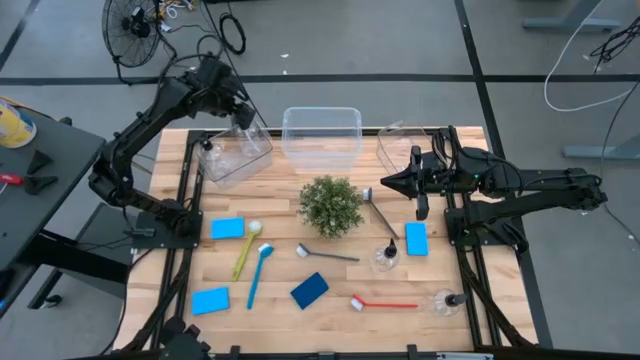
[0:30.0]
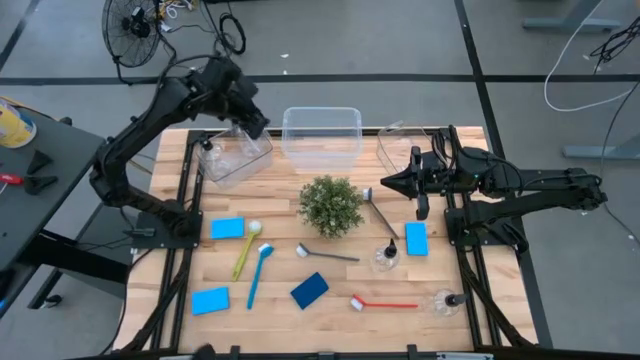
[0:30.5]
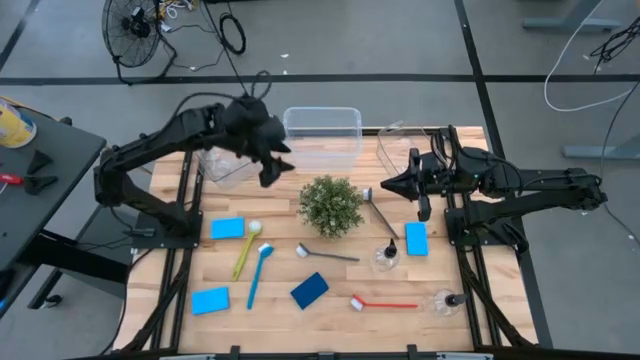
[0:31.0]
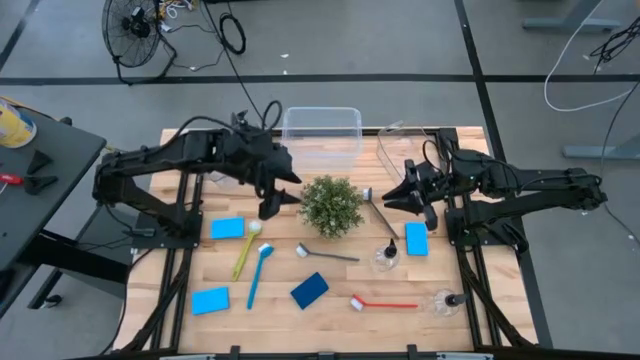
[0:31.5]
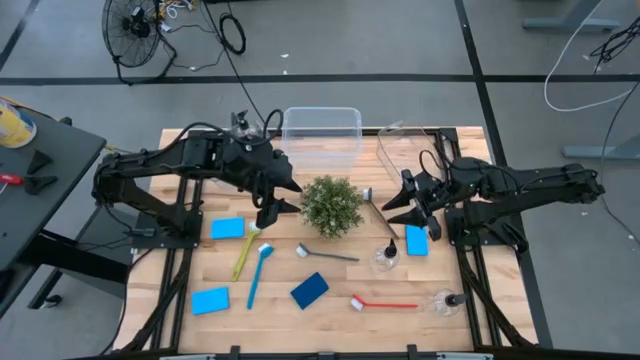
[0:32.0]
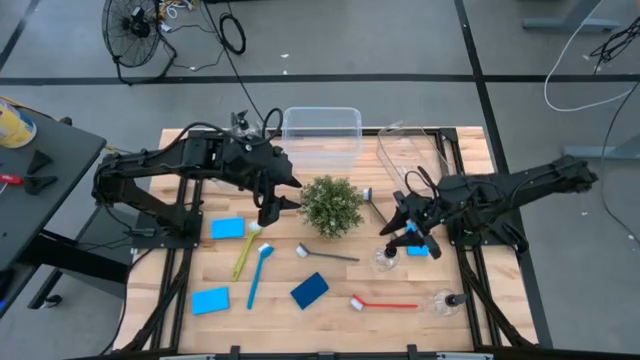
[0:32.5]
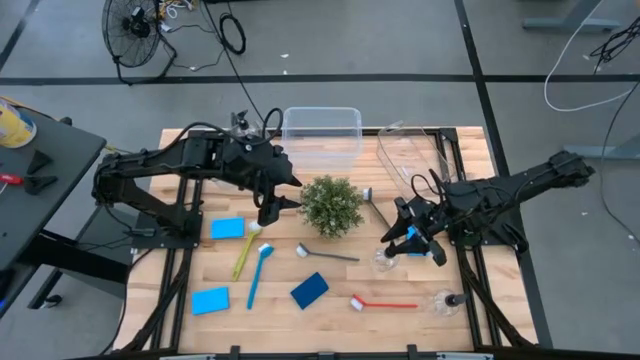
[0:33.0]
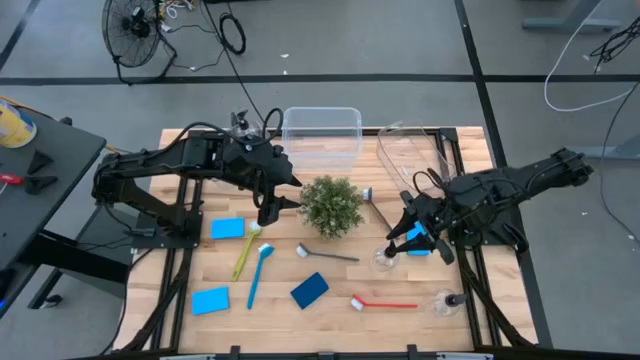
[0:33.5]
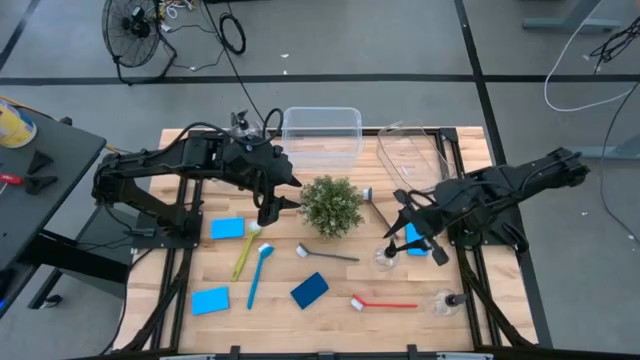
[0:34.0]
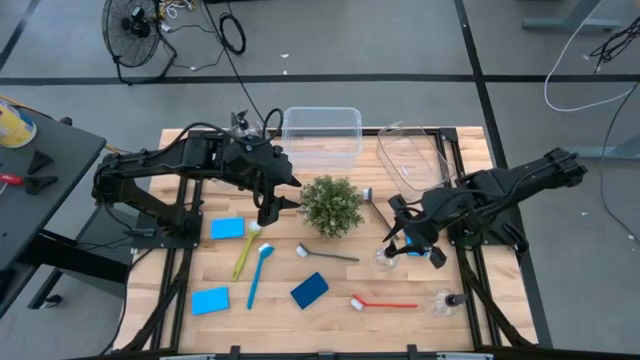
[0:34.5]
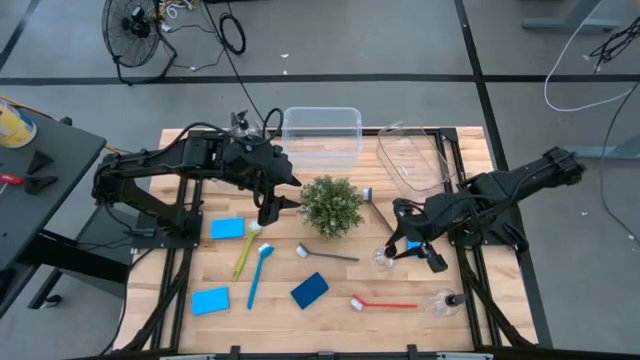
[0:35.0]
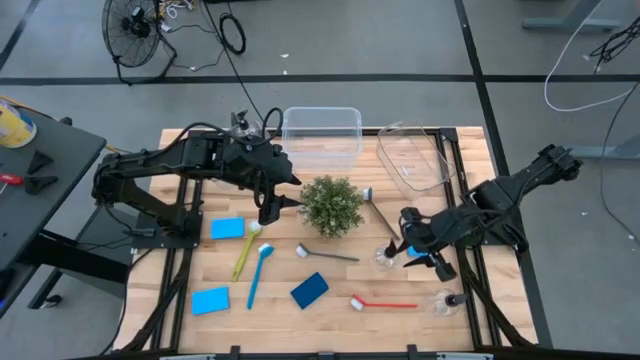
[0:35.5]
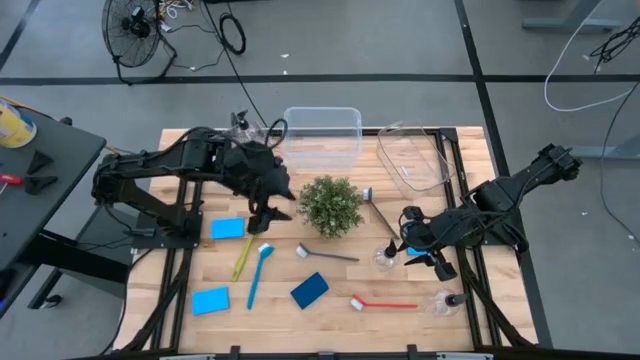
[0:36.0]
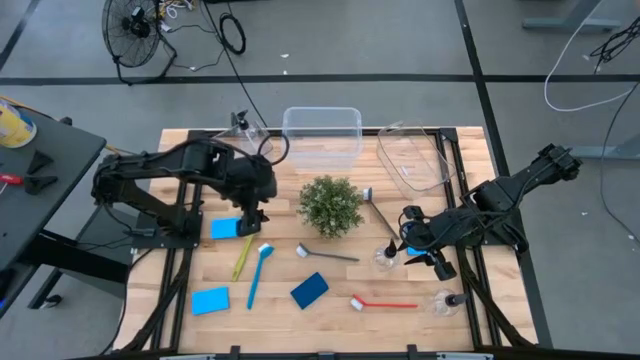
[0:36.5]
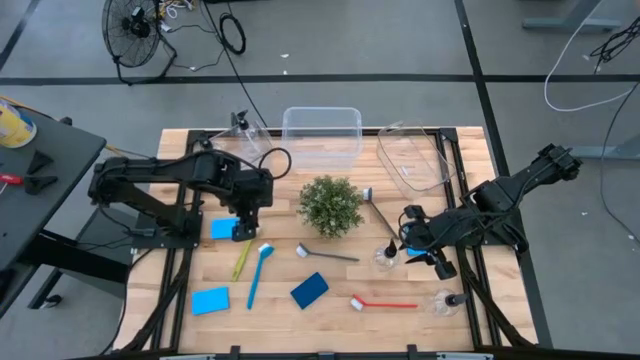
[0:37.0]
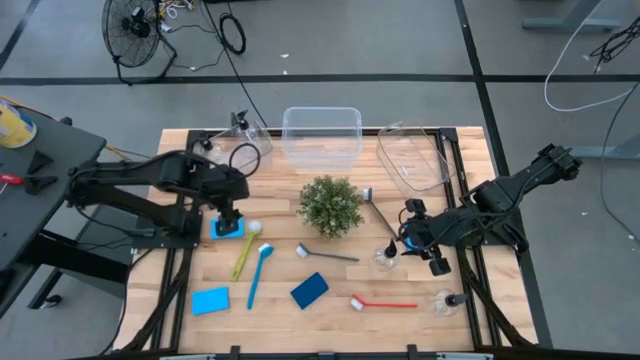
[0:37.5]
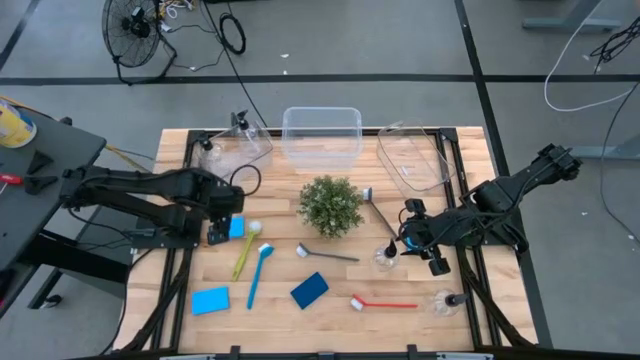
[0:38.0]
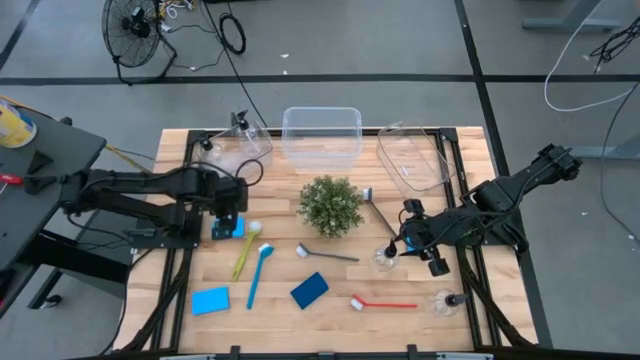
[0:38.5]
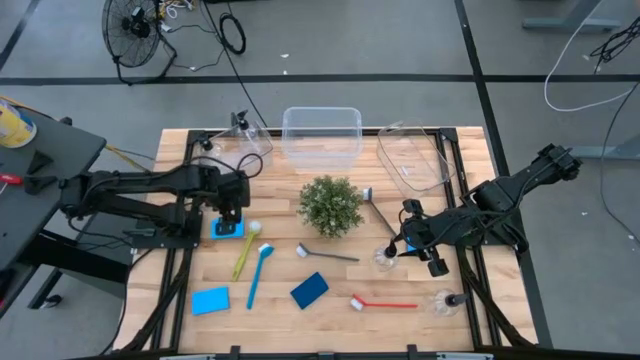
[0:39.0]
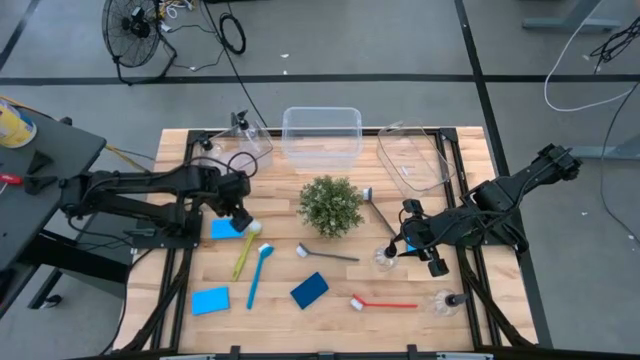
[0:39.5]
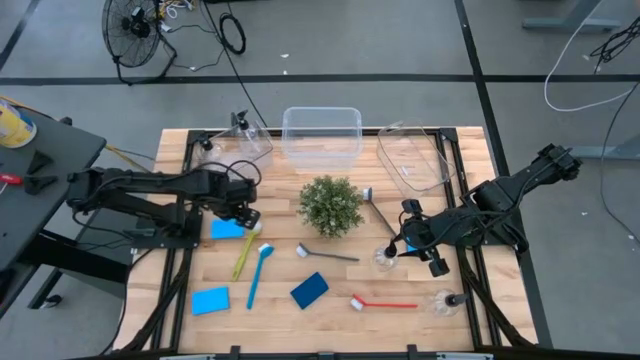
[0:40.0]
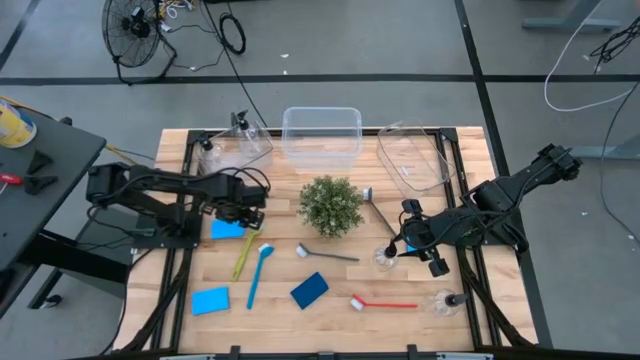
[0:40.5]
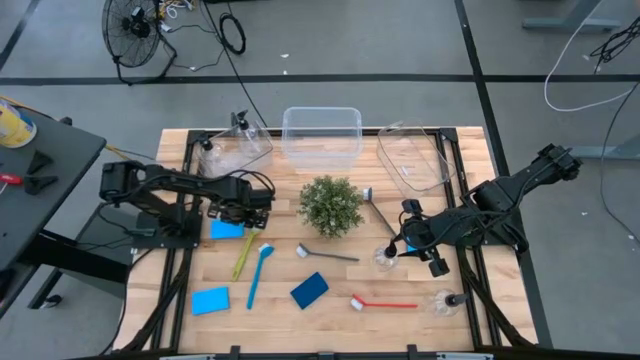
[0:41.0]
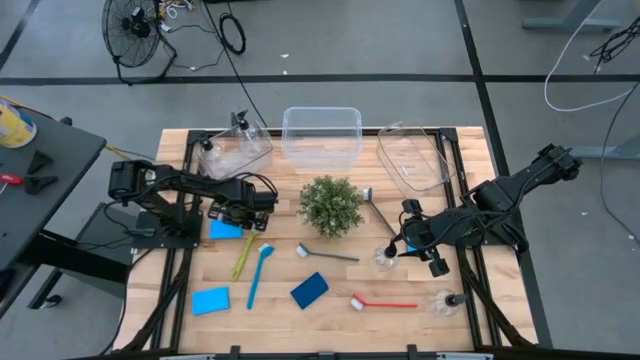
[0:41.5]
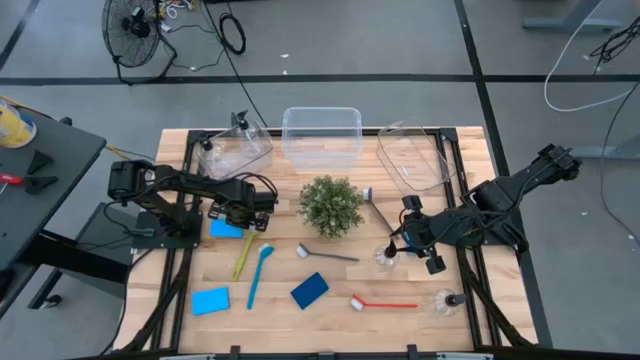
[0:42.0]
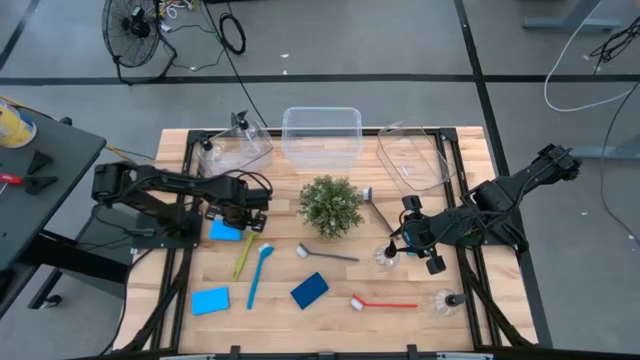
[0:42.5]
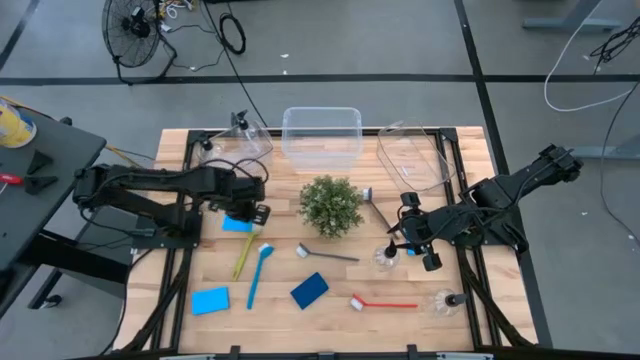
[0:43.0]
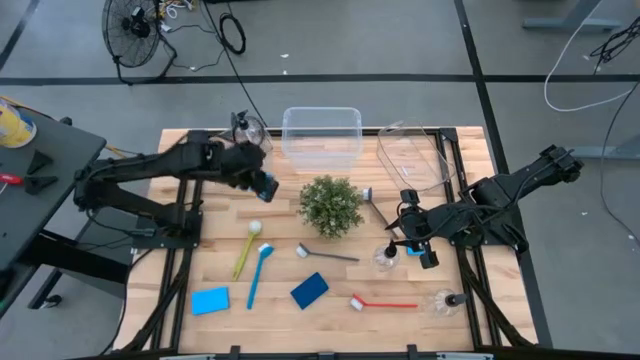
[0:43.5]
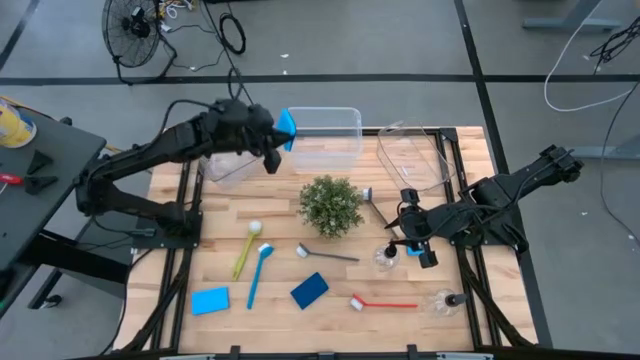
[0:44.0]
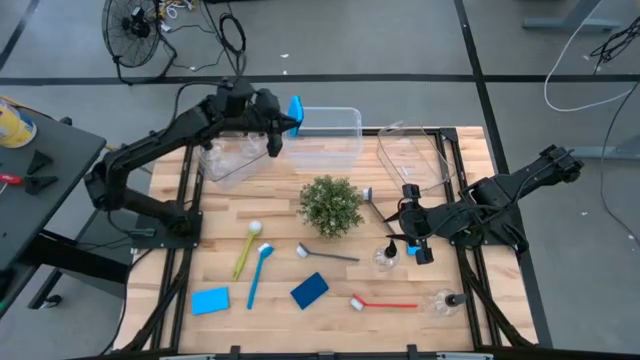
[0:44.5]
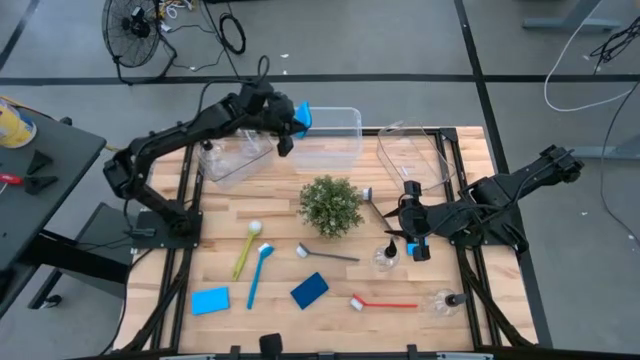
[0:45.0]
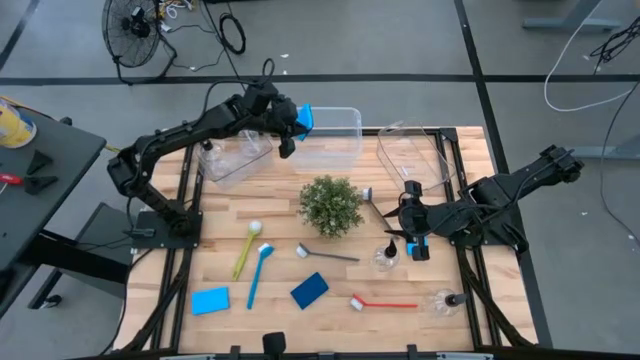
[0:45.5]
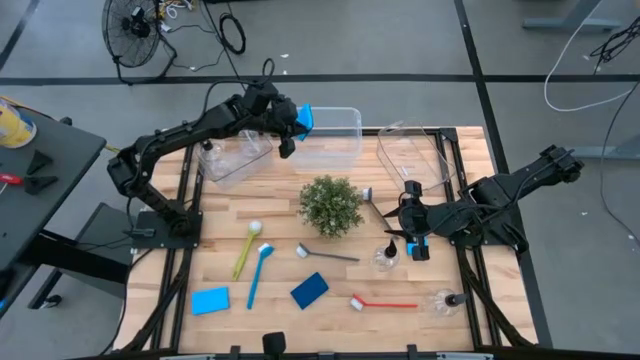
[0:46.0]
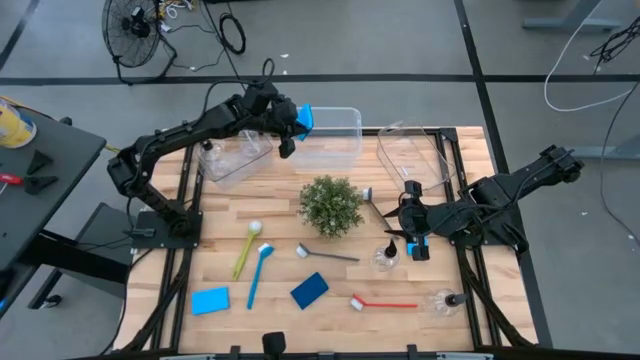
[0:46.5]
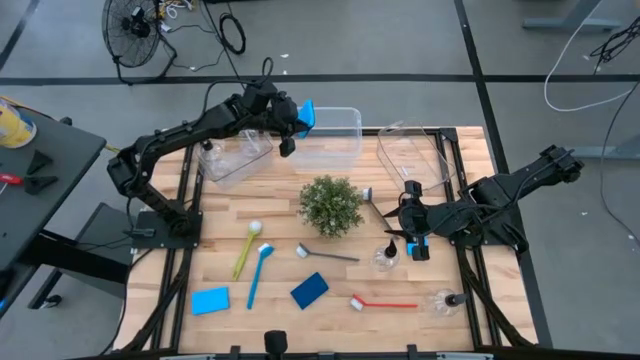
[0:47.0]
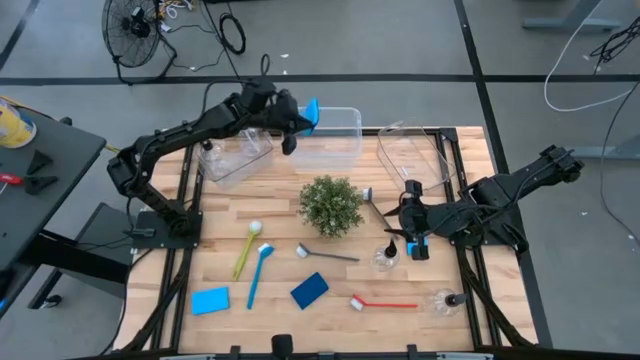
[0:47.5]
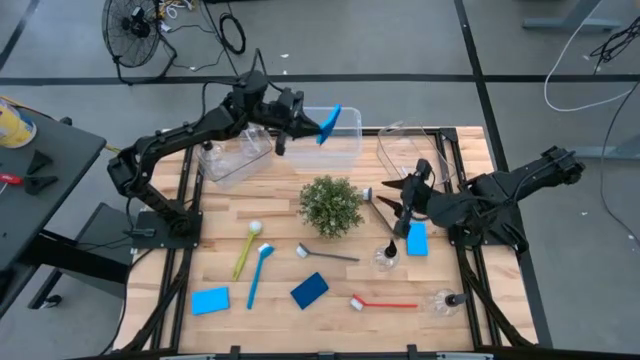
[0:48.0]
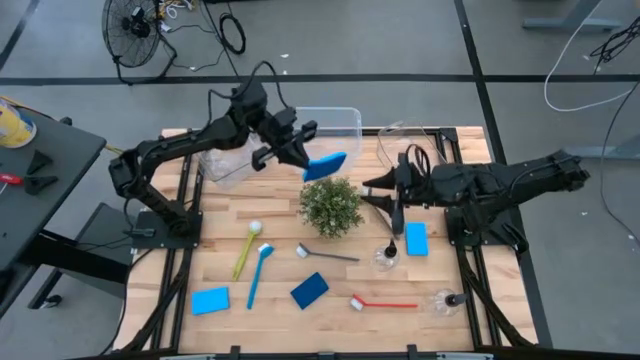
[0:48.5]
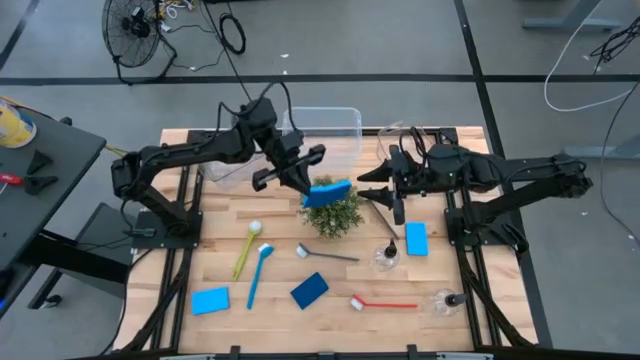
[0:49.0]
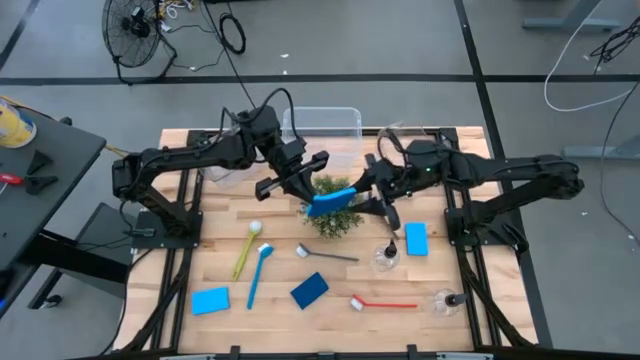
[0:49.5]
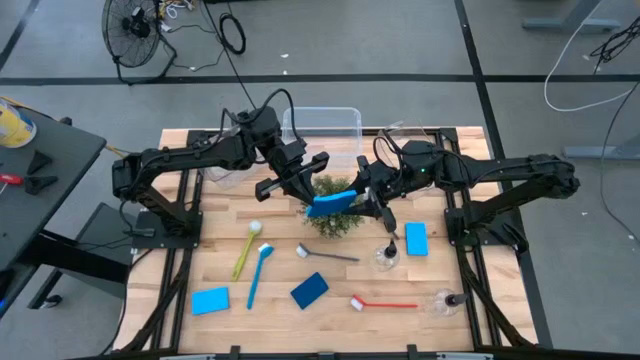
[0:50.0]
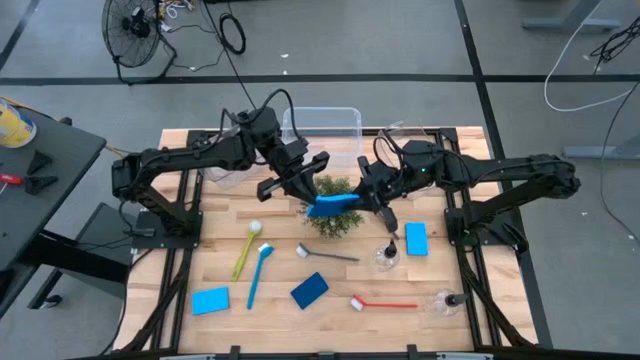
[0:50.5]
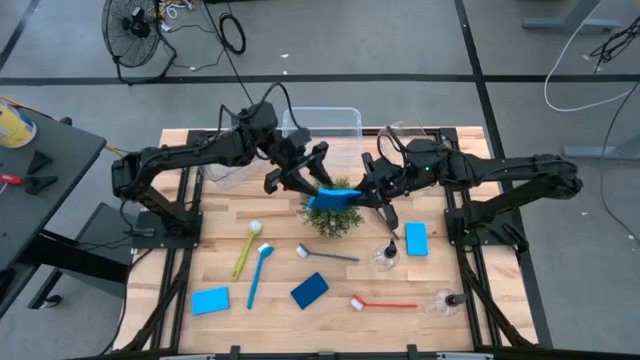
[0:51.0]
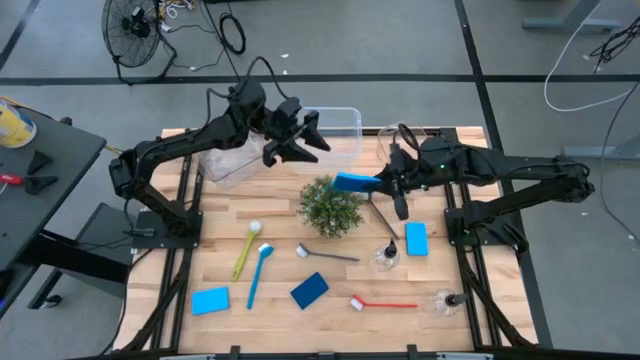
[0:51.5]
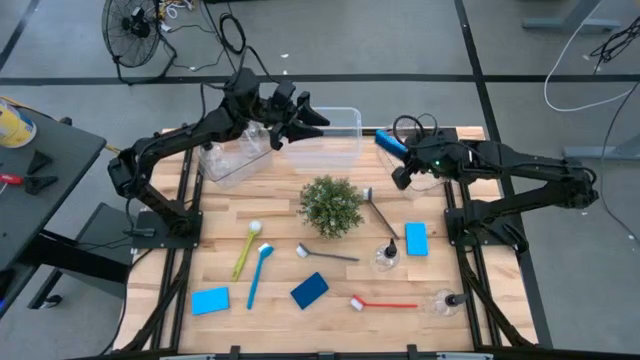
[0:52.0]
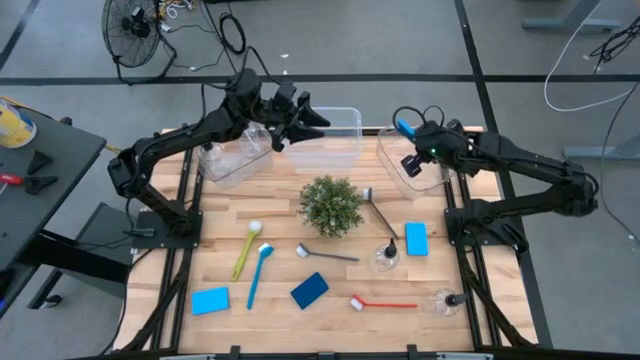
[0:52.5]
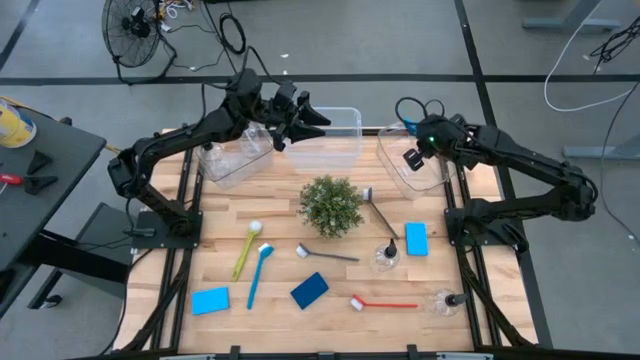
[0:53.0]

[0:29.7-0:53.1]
Task: Pick & Place Kitchen Sink Supplies
Put the blue sponge into the right transparent bin
